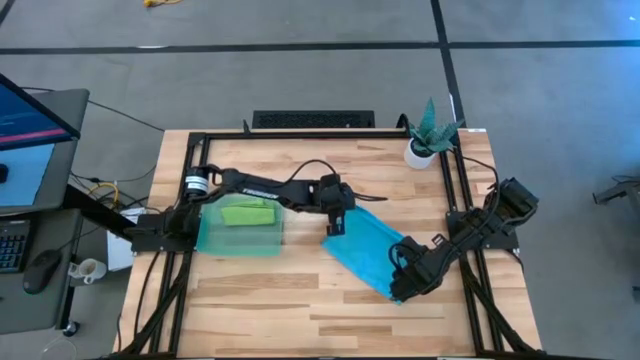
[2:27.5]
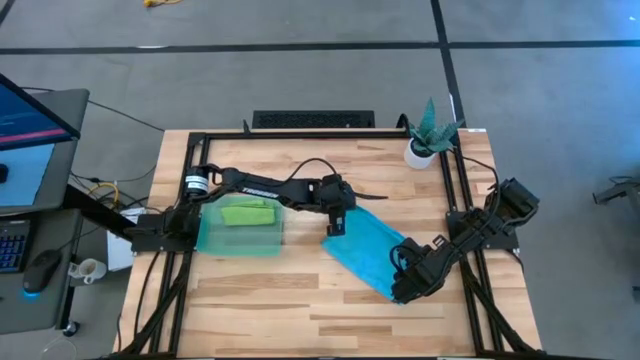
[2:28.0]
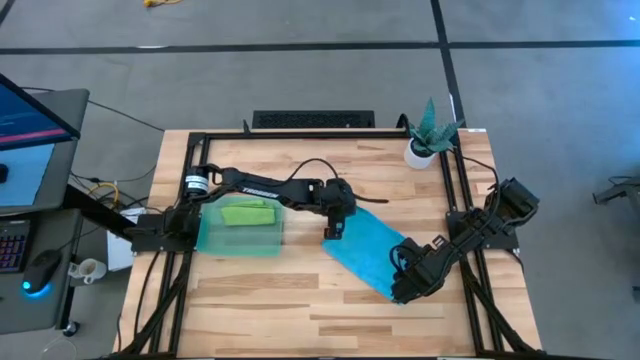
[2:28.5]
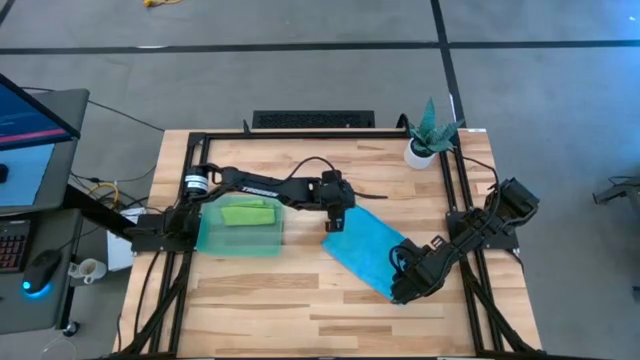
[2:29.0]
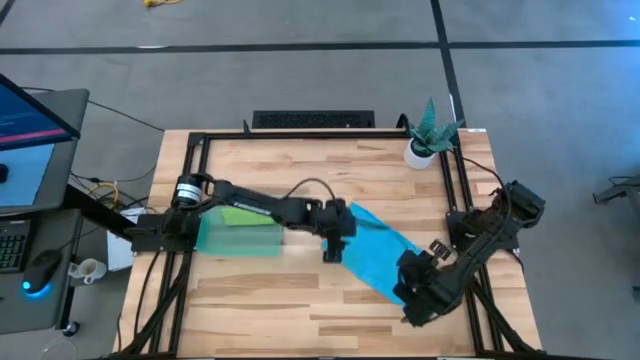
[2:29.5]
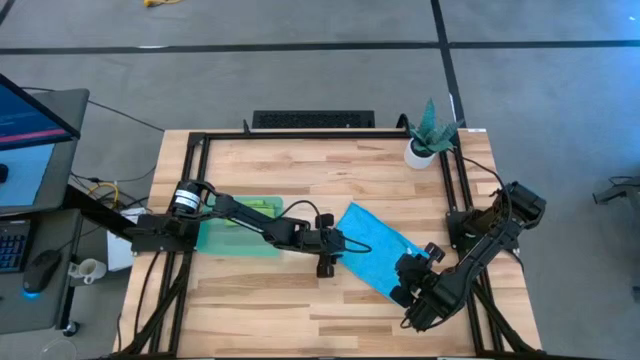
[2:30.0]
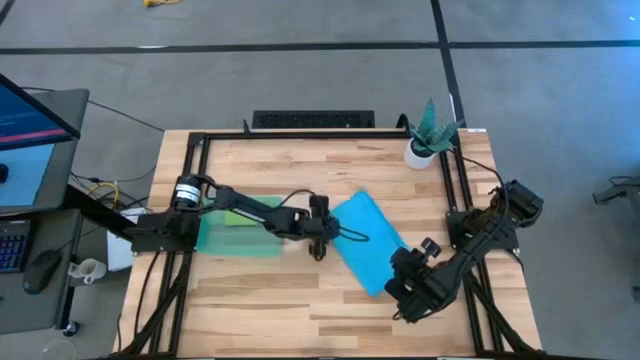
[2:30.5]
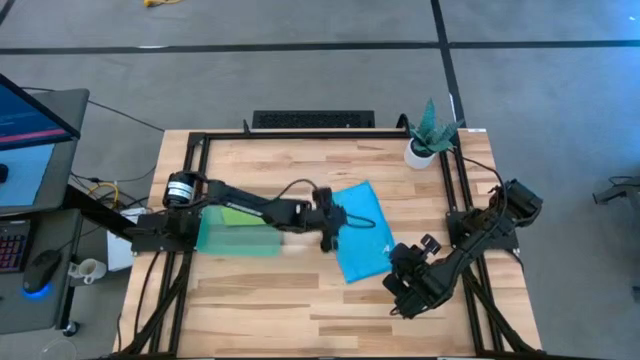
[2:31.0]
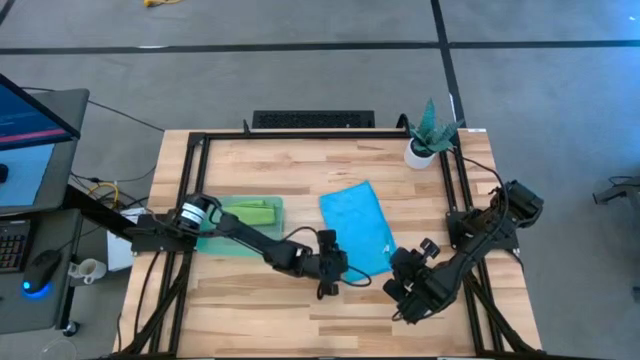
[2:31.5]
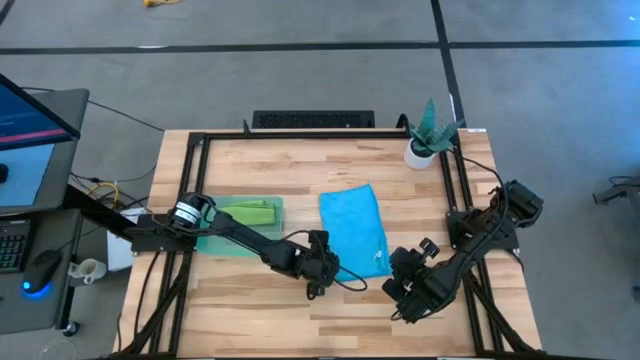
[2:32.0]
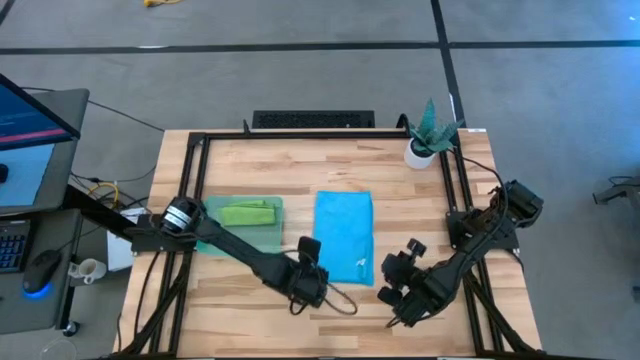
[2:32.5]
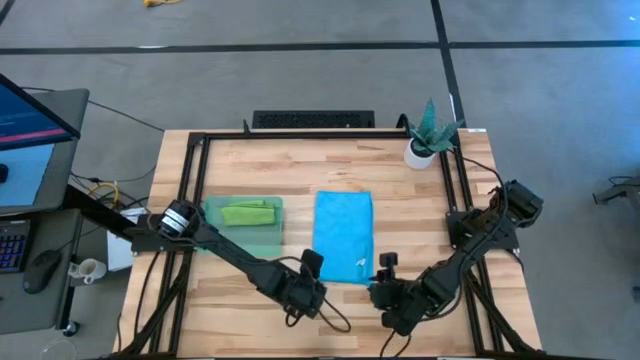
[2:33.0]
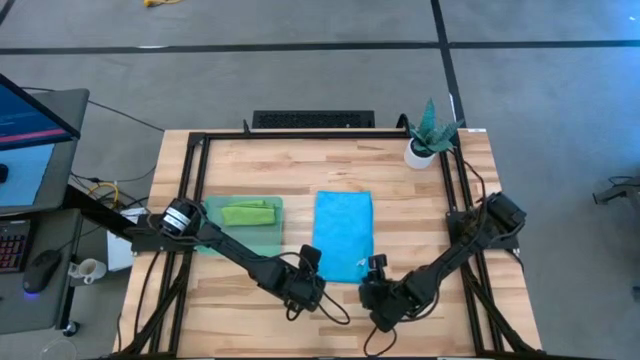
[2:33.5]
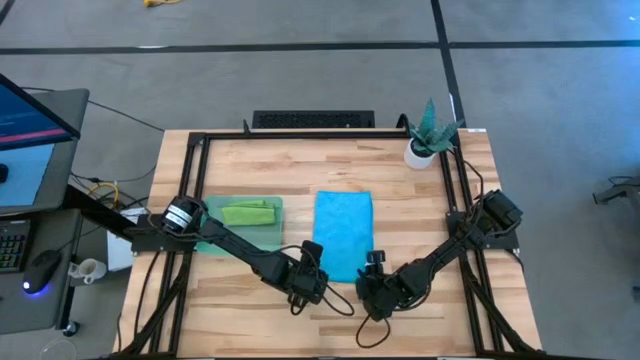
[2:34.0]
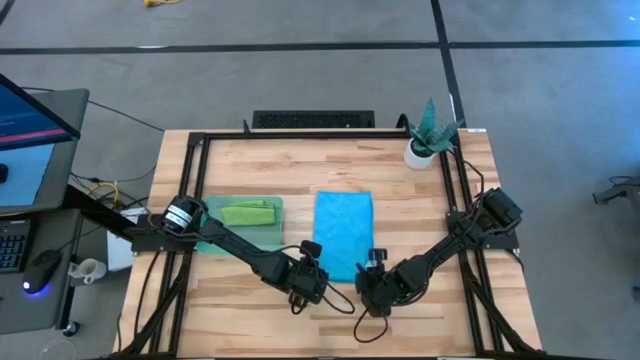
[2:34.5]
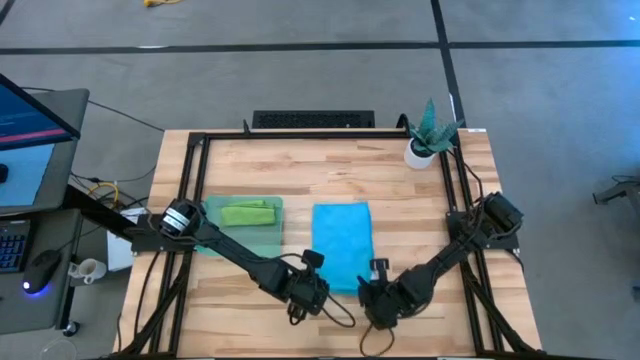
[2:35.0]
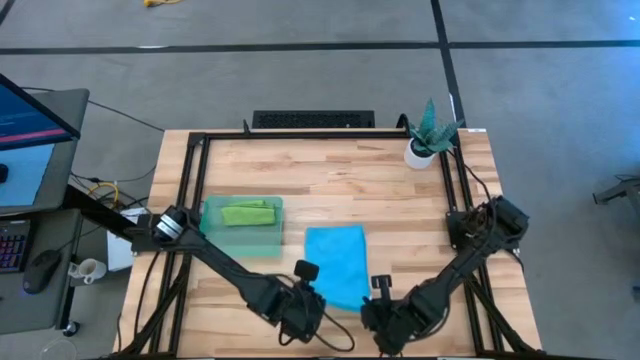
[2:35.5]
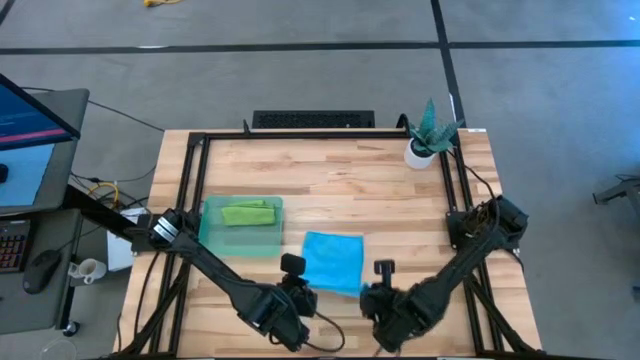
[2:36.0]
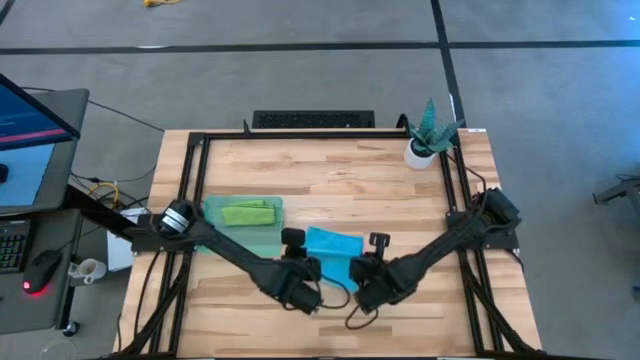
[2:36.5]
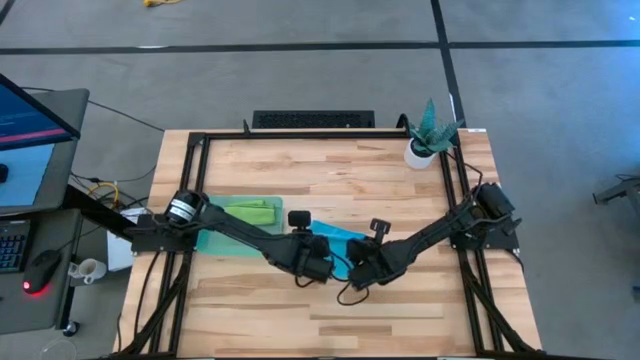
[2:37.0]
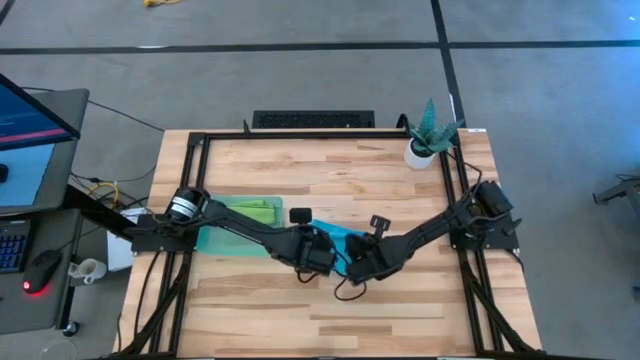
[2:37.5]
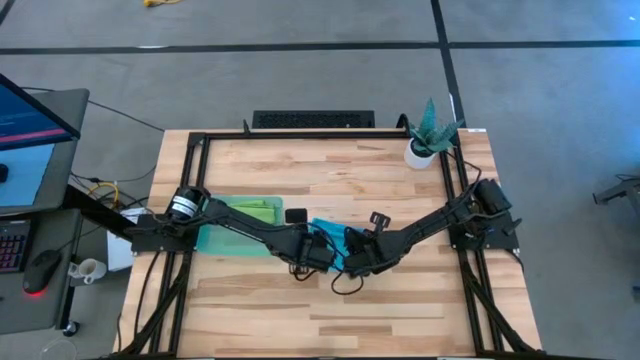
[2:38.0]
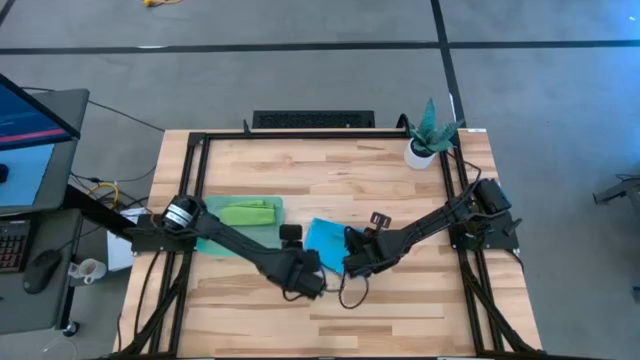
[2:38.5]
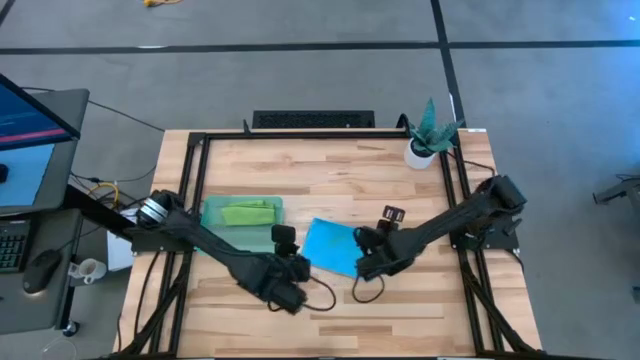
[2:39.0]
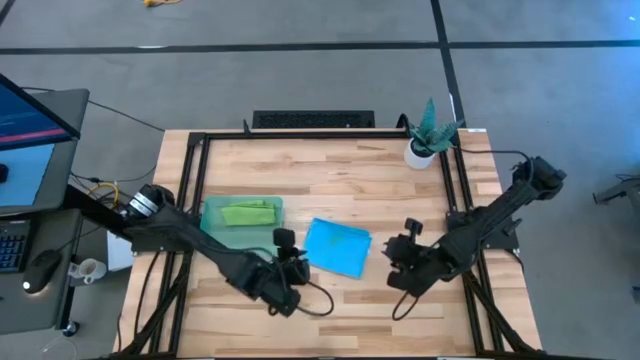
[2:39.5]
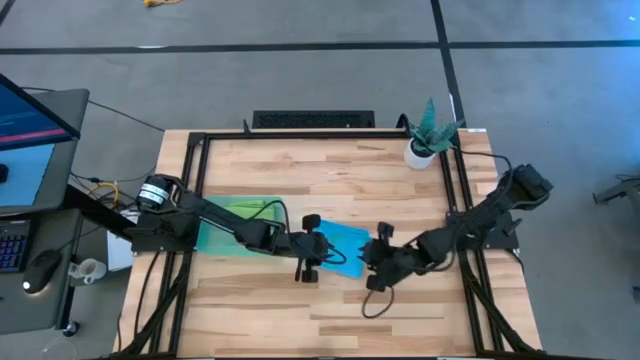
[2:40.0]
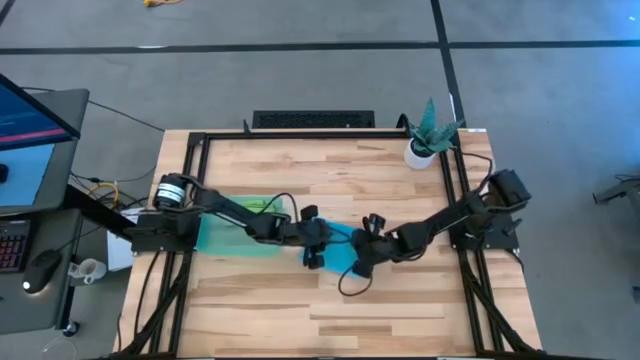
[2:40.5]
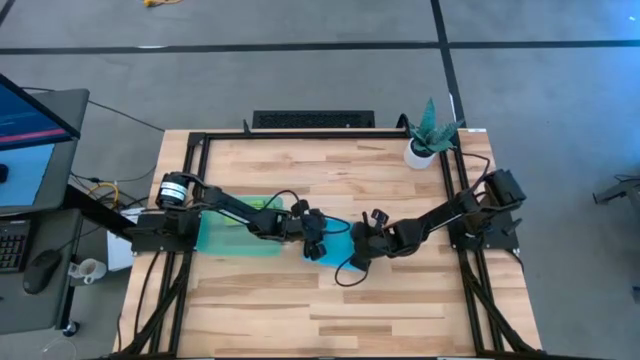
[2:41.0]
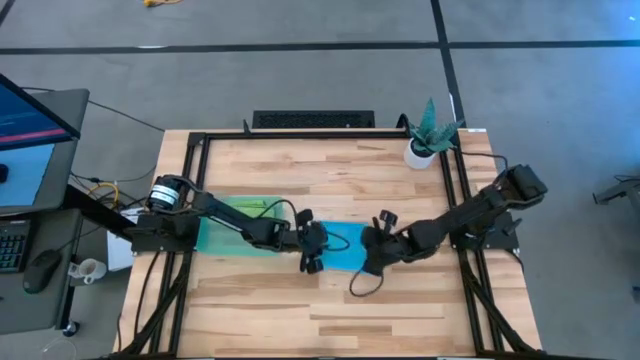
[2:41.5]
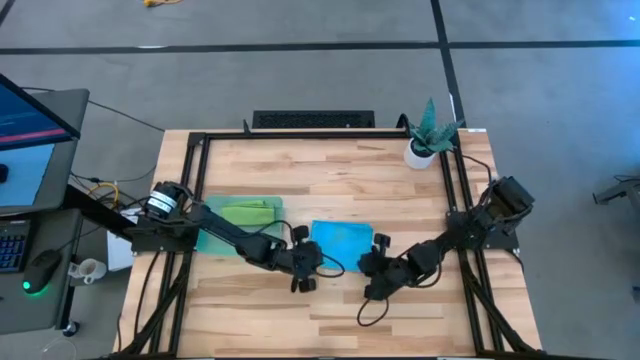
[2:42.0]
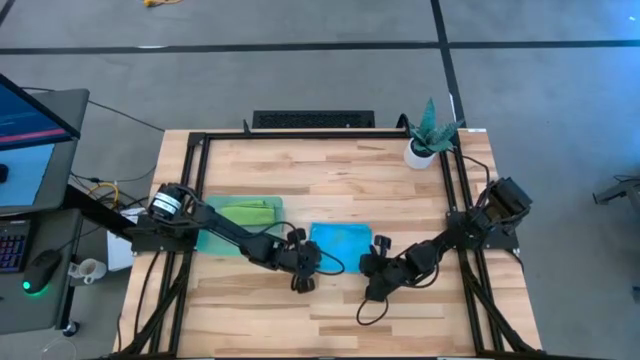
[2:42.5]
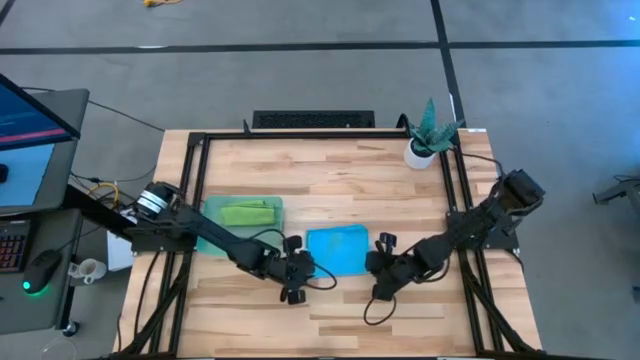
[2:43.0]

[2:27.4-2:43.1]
Task: Roll microfiber towels into tight, uniform cylinder then place into a basket
Fold the blue towel

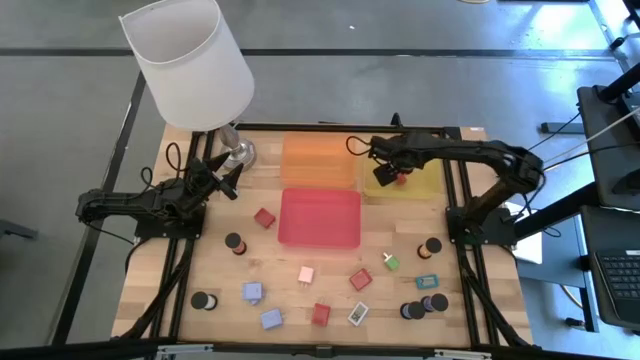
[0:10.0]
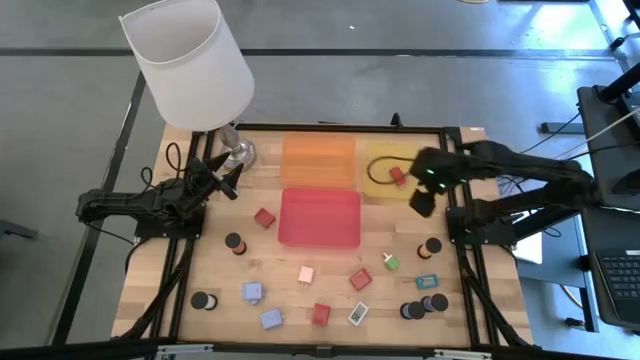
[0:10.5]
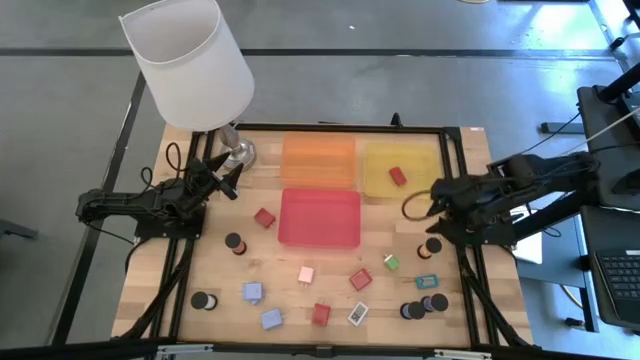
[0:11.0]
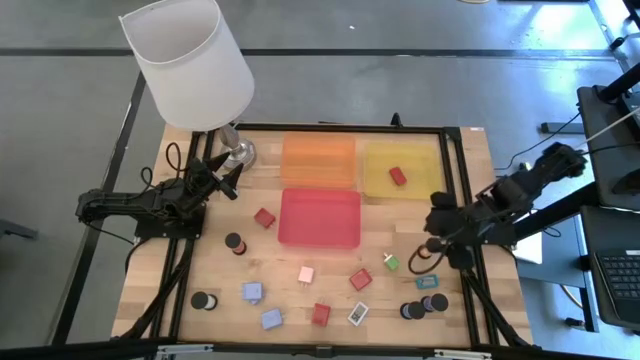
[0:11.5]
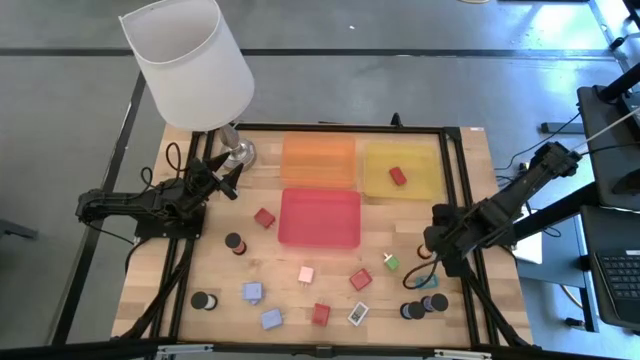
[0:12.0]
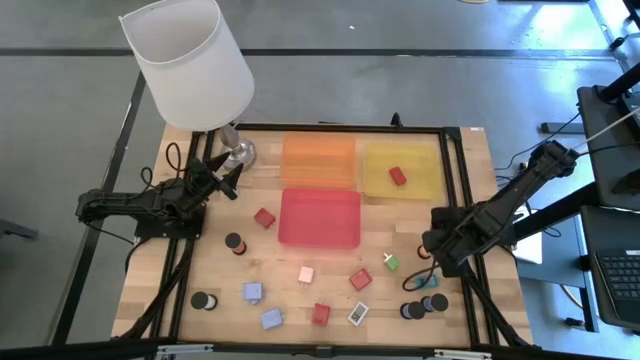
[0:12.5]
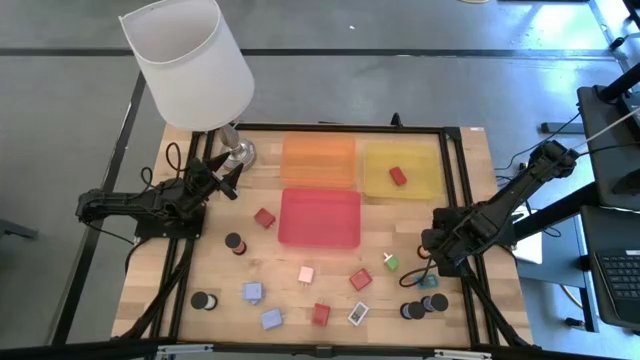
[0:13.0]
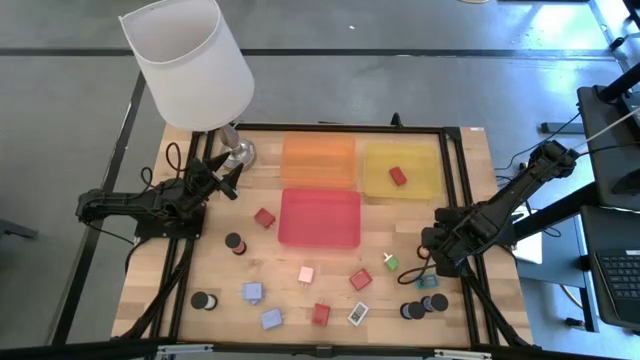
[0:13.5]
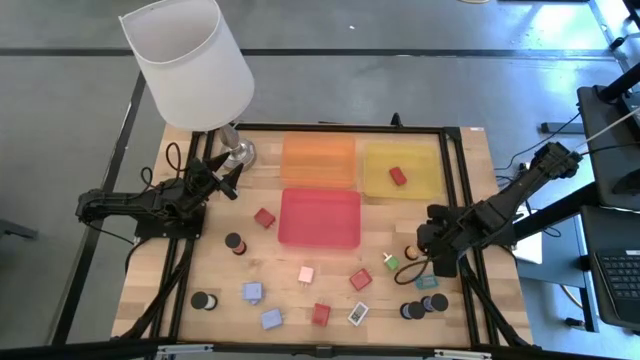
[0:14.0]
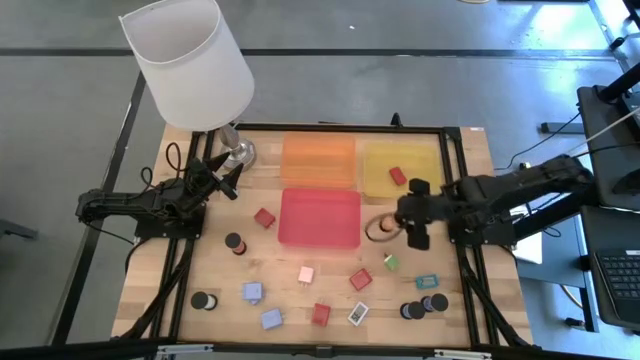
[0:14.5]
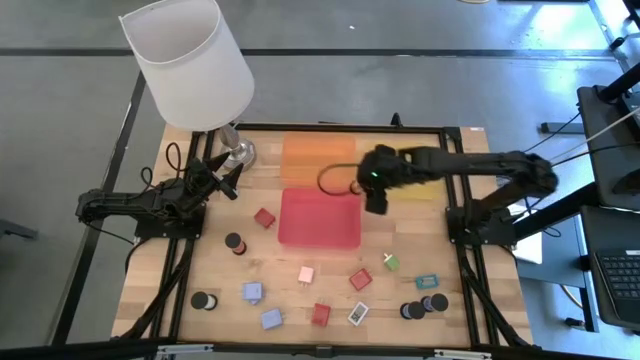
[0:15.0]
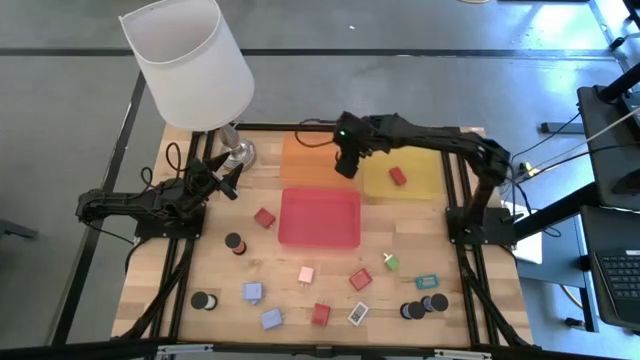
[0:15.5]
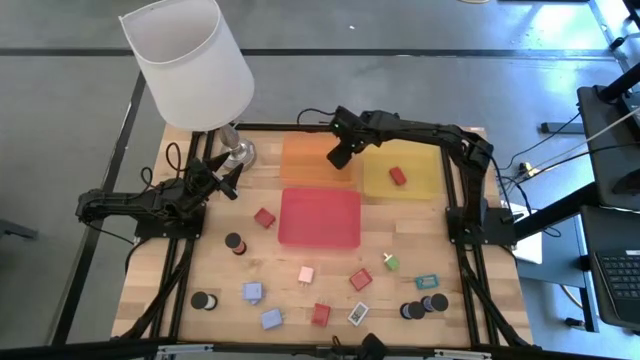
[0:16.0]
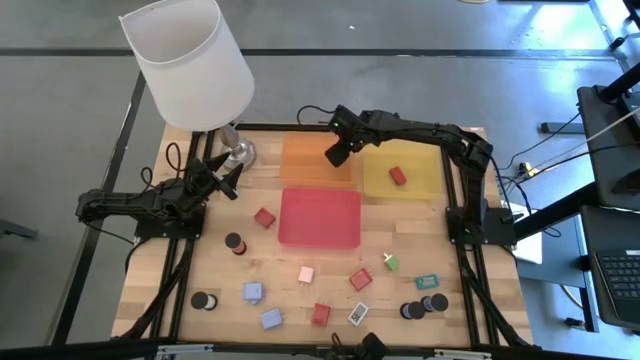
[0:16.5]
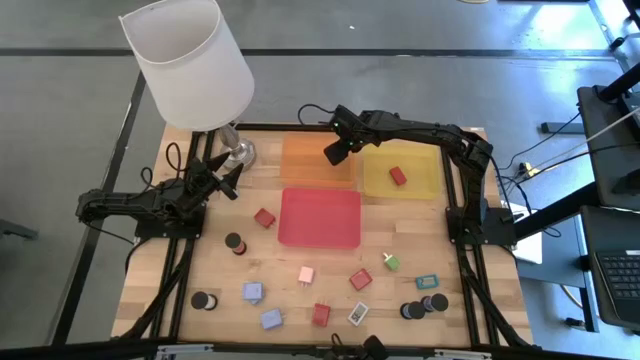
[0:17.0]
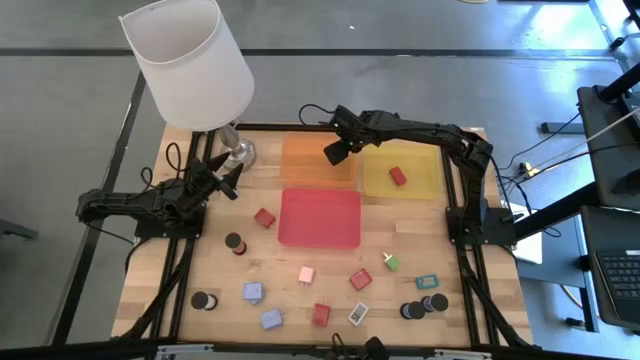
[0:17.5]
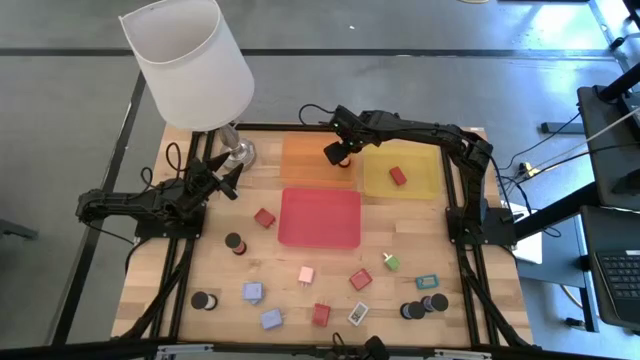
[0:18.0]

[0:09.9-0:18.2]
Task: Pick & Place Office items
Put the yellow black hourglass into the orange bin
